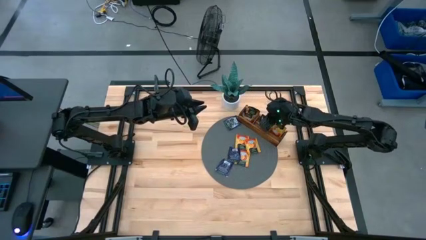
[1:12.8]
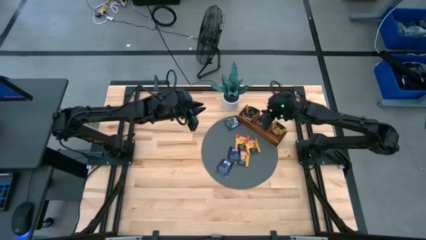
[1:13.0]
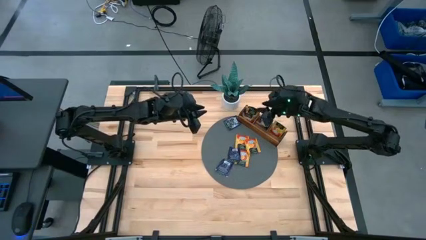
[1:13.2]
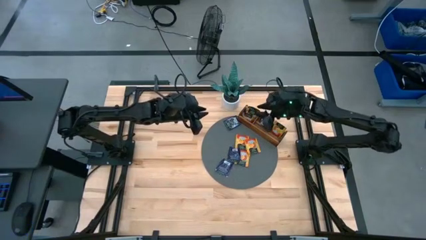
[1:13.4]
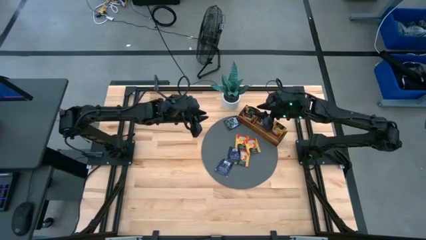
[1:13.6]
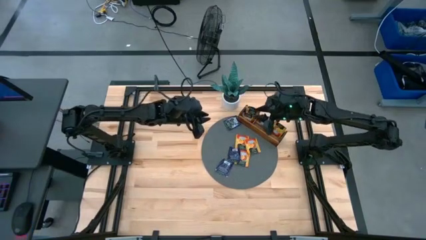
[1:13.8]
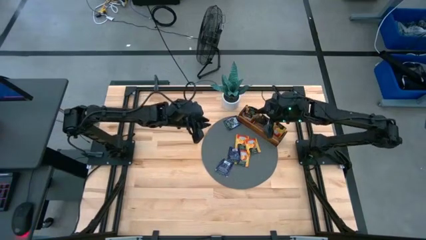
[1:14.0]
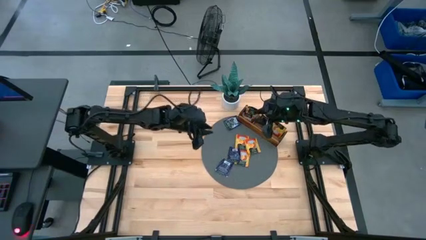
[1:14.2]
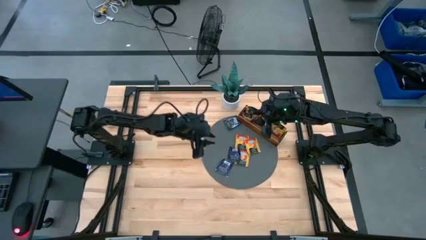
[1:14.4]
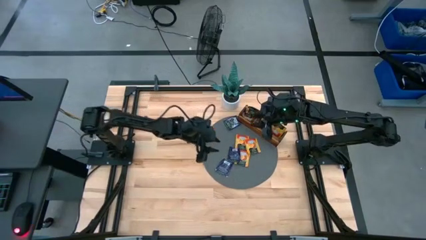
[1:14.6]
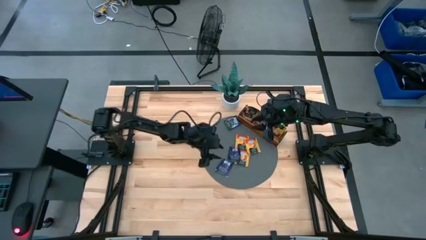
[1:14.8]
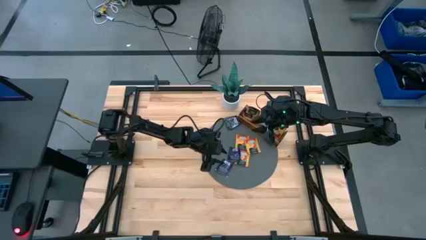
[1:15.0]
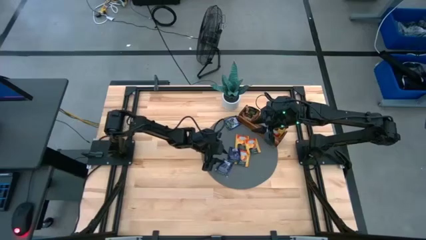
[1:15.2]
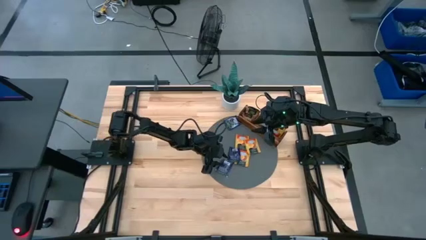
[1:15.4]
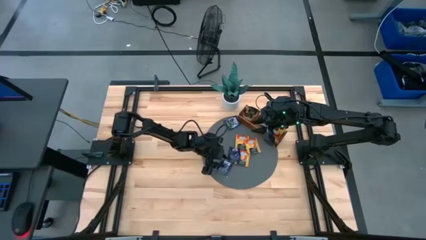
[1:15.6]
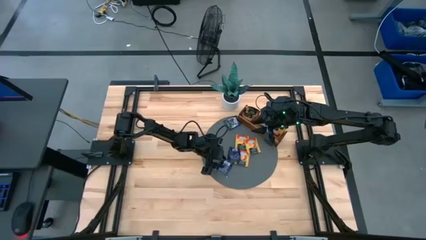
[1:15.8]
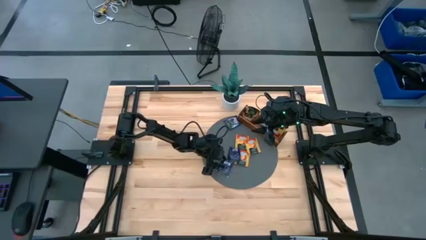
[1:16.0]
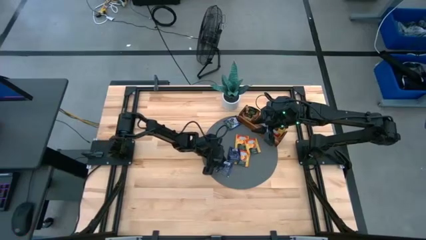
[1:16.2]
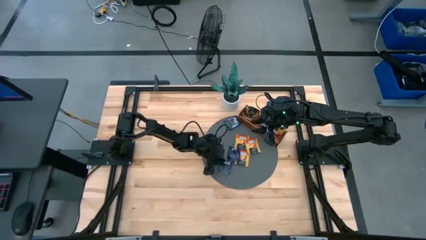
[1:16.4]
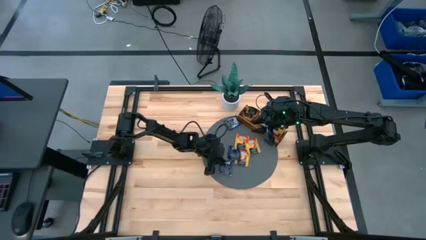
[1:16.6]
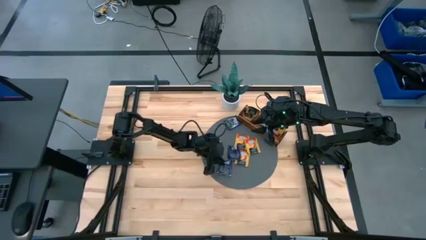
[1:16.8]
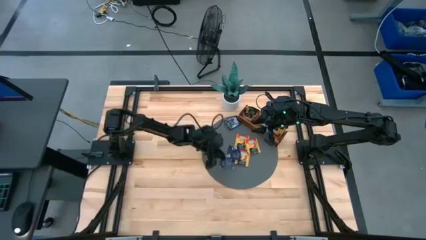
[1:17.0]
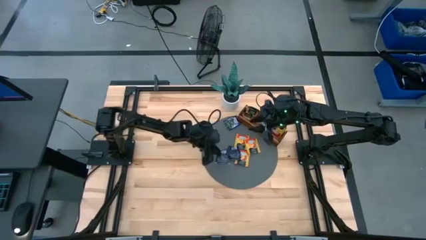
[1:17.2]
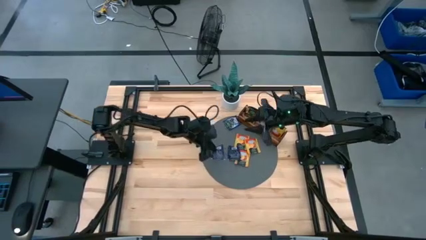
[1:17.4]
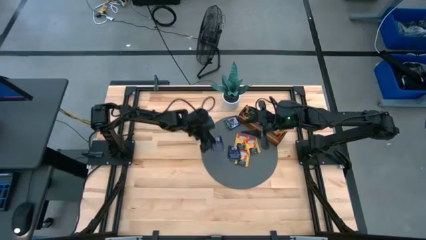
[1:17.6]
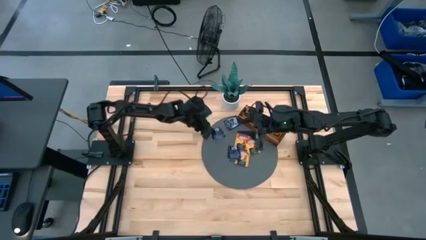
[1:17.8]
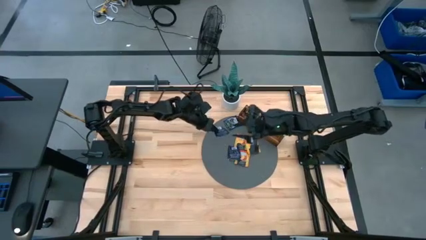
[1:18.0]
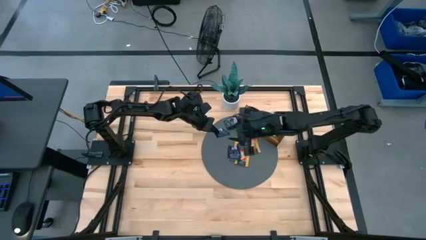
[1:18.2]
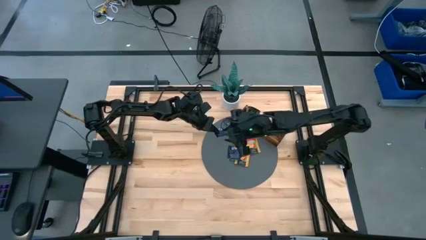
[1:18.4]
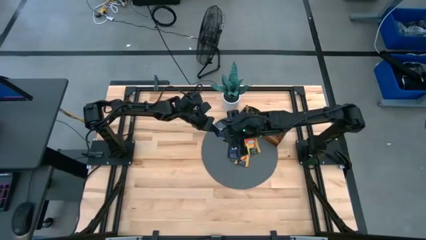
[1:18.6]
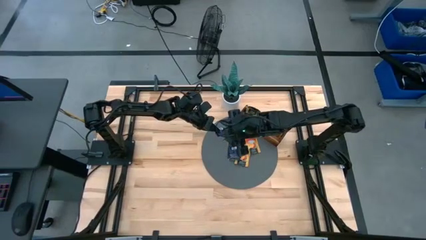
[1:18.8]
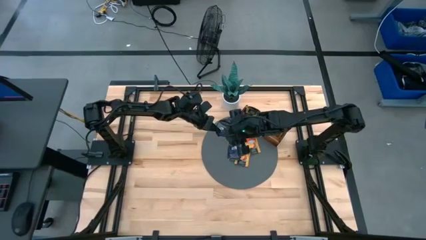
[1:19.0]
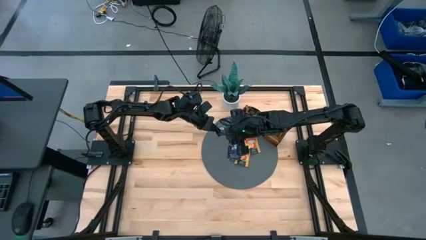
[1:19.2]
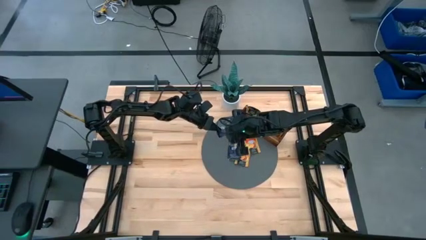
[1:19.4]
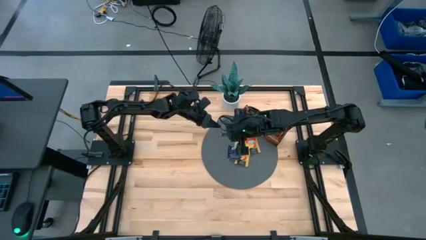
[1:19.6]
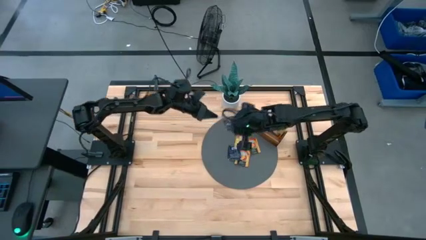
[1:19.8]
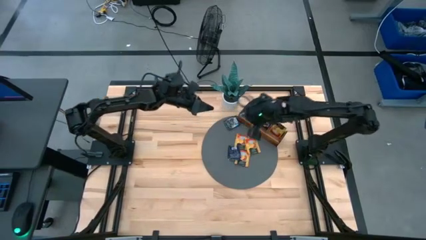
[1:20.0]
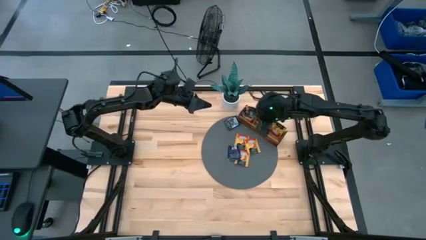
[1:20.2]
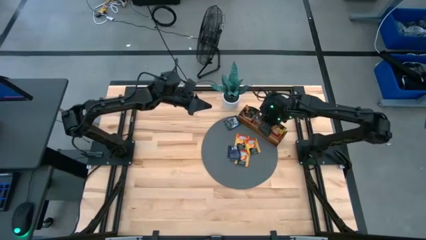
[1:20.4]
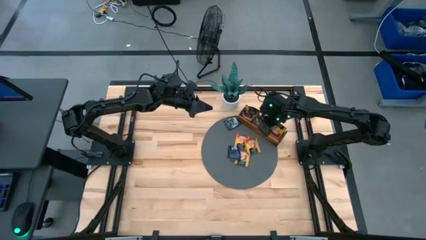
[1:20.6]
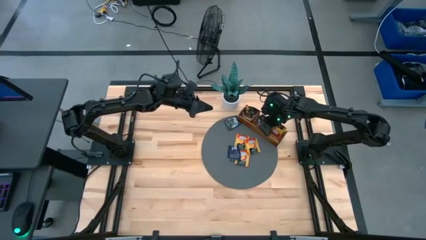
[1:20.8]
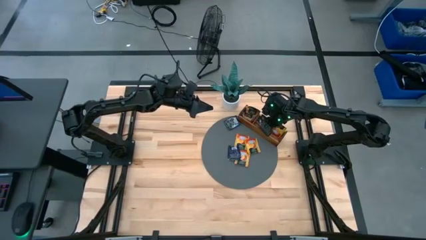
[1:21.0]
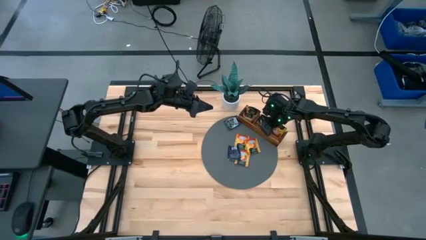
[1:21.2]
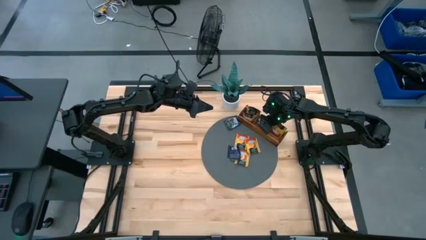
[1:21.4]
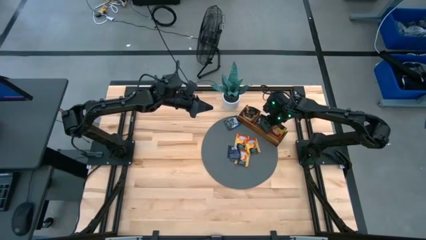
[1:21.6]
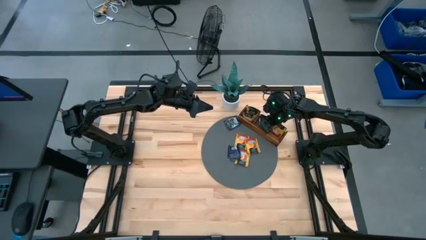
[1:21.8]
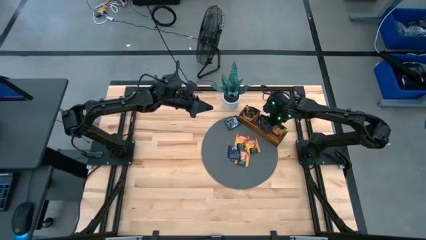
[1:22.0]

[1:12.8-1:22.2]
Task: Pick & Place Tea
Put the purple tea bag into the wooden organizer
